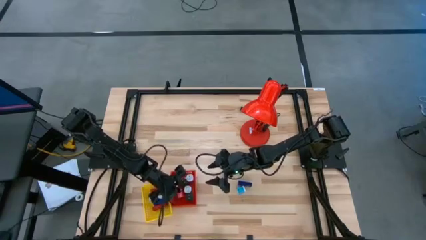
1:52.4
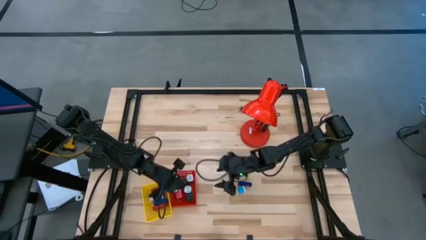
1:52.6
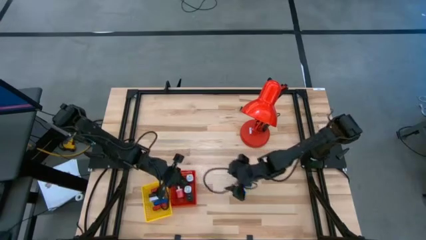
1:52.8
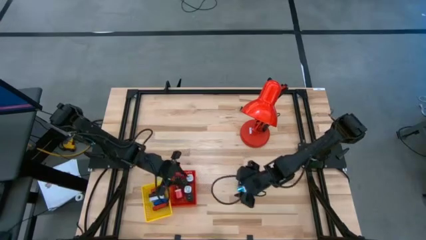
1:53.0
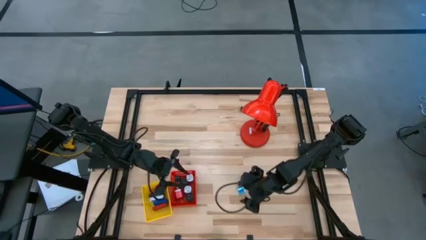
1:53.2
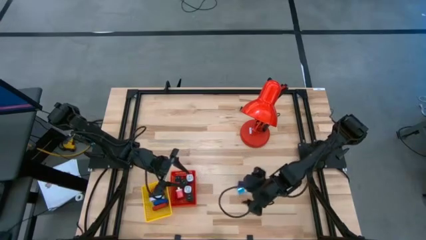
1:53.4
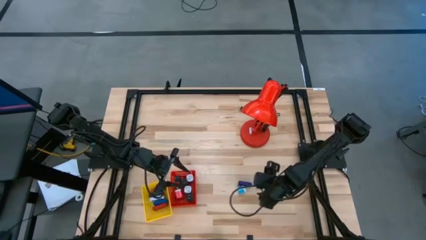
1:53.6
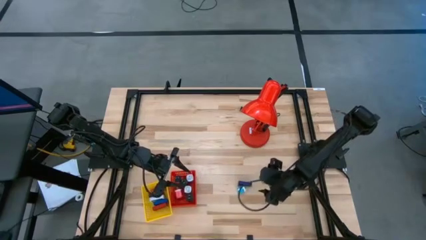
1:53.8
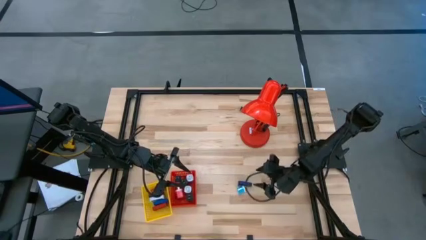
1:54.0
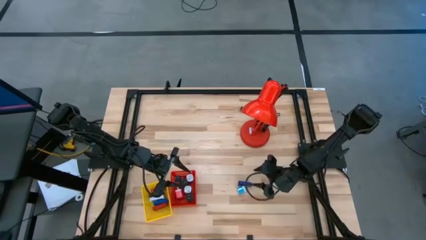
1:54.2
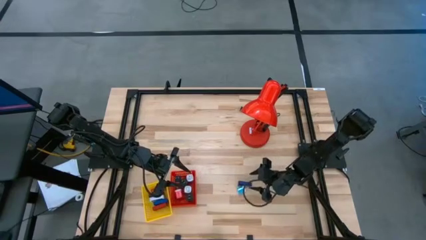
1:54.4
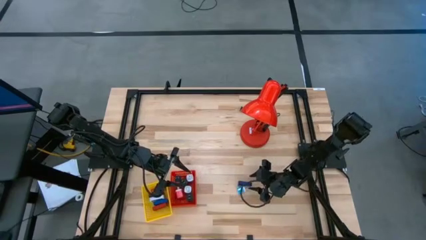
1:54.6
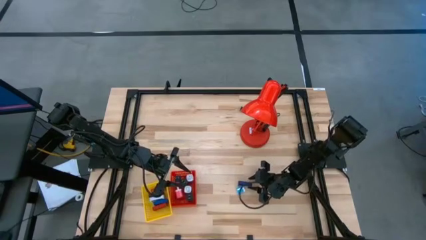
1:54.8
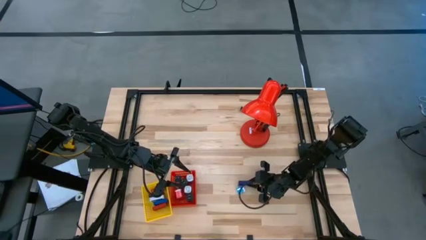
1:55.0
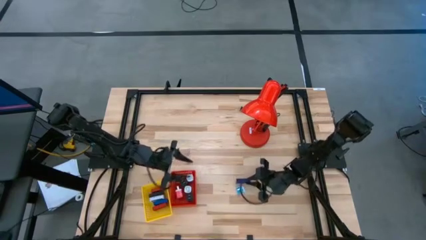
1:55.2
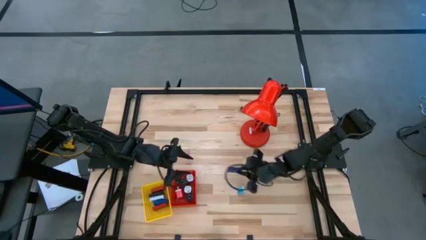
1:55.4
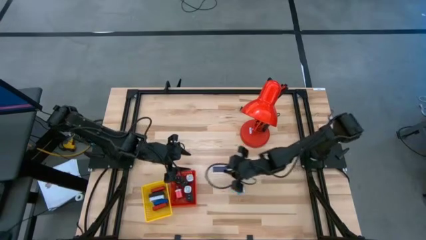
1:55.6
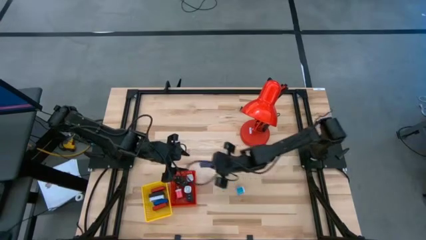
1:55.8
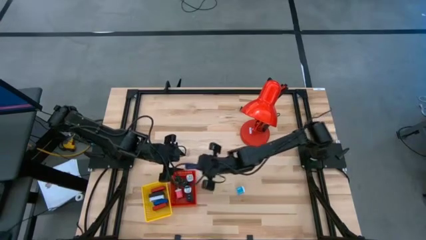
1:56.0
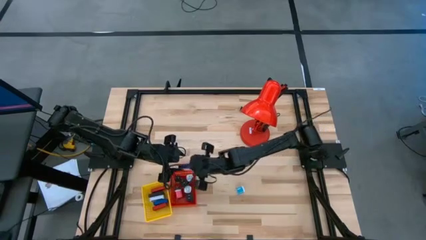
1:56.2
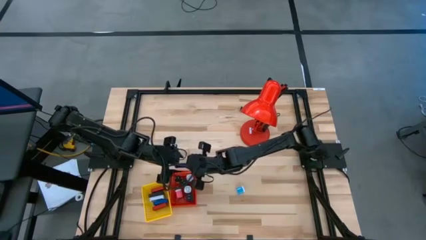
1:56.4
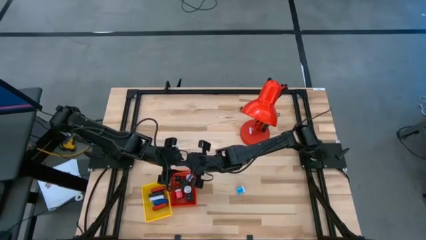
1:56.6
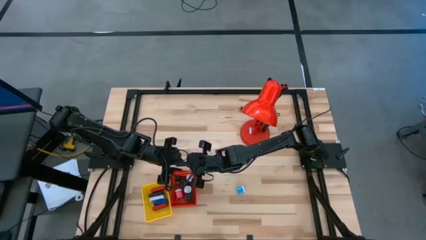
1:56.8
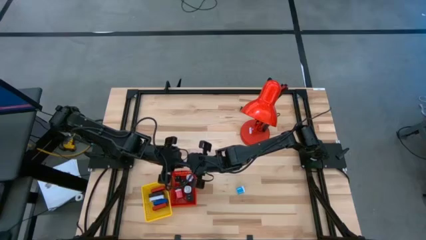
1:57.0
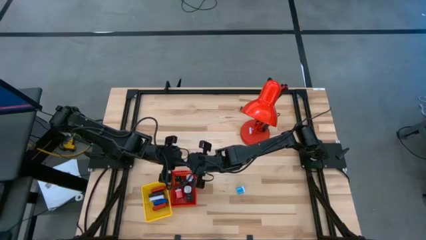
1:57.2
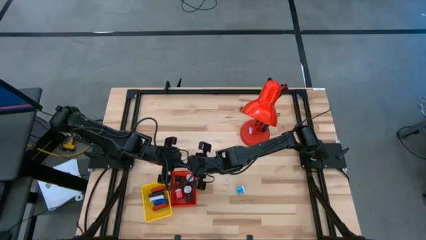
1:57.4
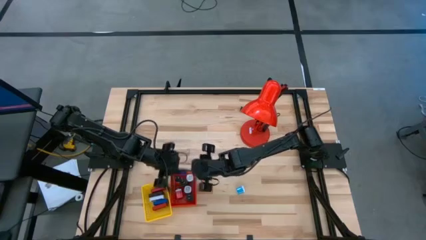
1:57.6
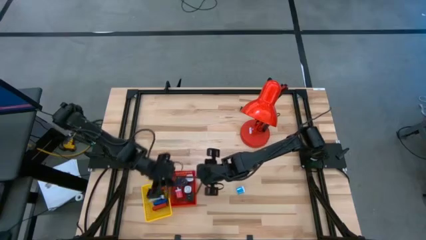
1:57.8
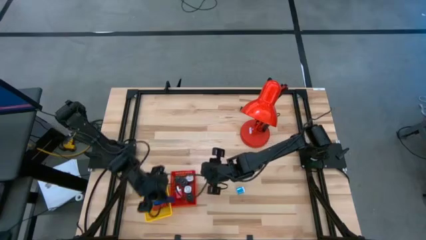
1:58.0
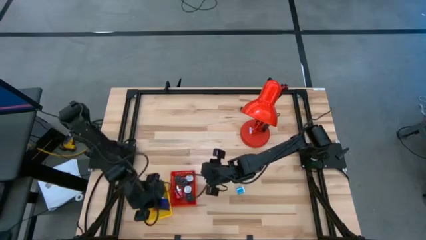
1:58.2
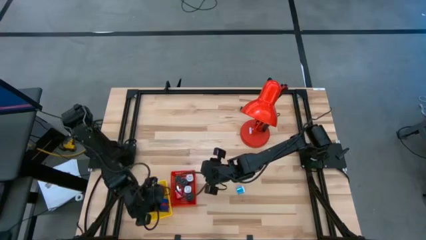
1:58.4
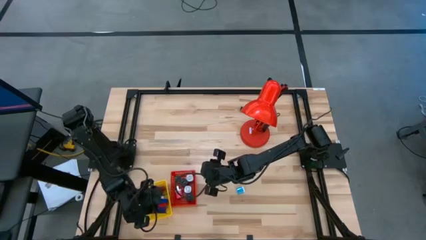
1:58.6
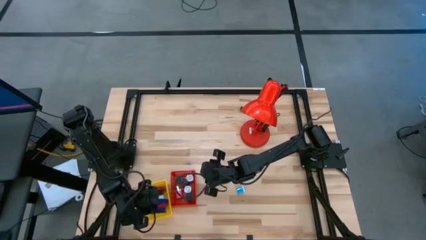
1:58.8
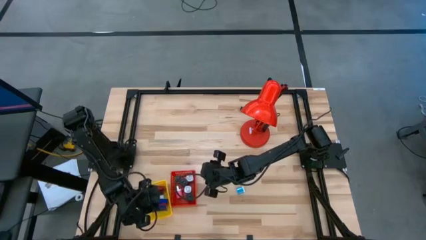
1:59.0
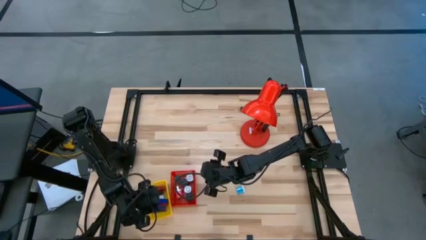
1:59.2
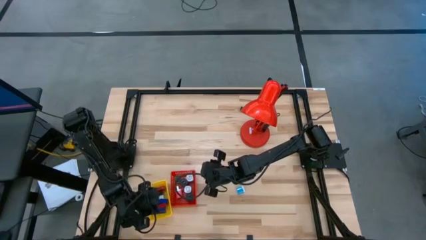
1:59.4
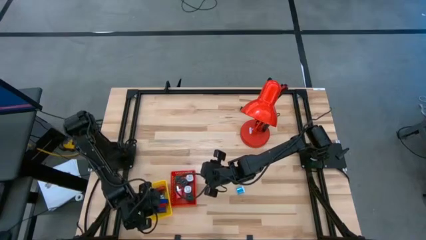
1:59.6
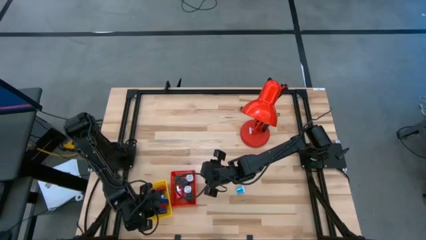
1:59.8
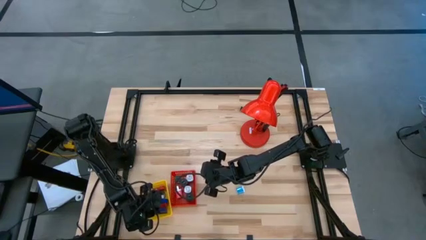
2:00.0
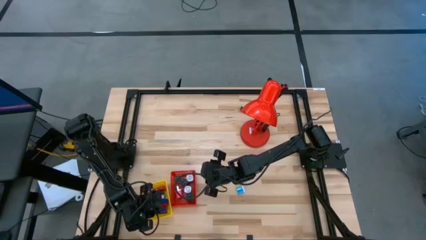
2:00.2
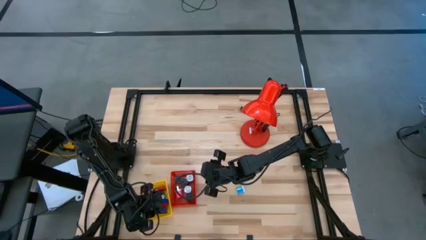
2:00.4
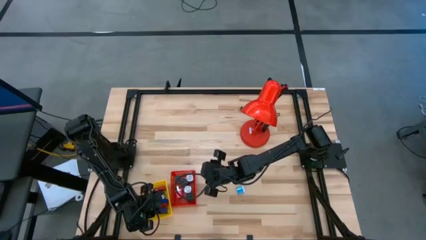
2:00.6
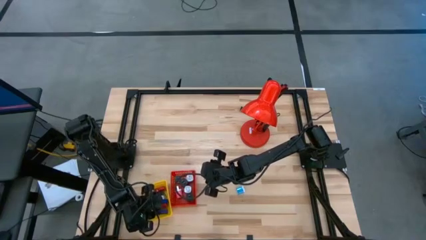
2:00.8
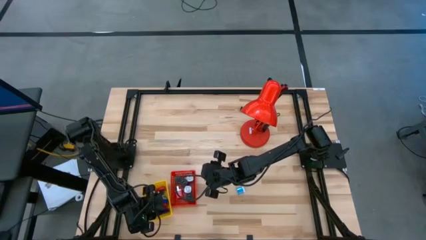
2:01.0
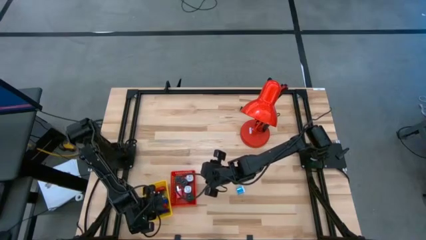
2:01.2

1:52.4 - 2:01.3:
Task: Pick & Place Office items
Put the blue digital clock into the yellow bin
